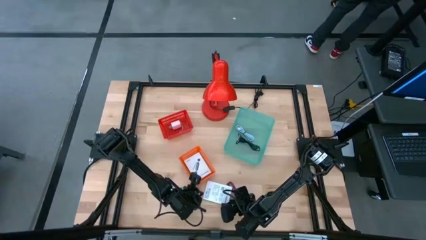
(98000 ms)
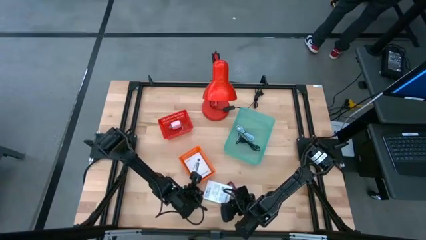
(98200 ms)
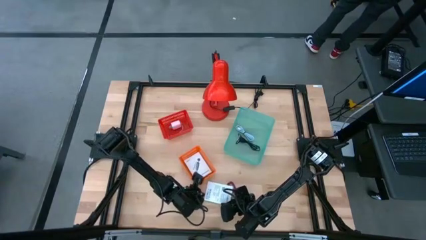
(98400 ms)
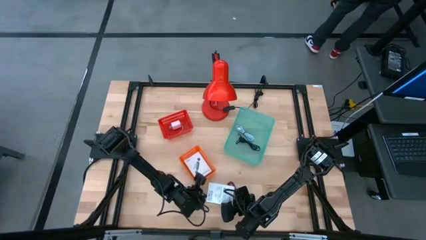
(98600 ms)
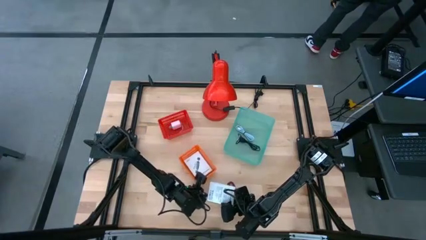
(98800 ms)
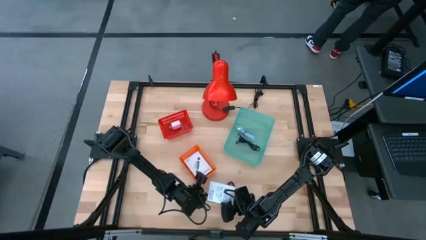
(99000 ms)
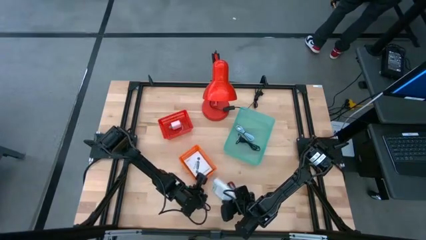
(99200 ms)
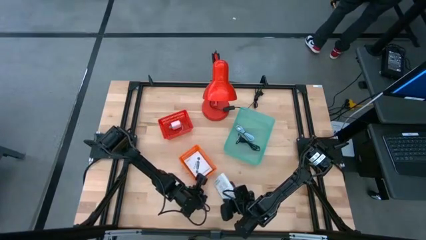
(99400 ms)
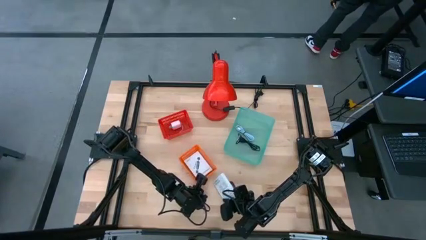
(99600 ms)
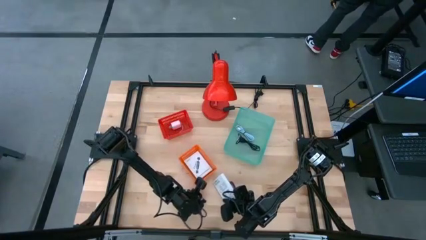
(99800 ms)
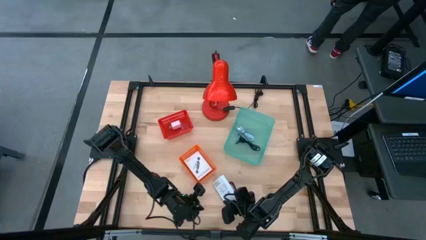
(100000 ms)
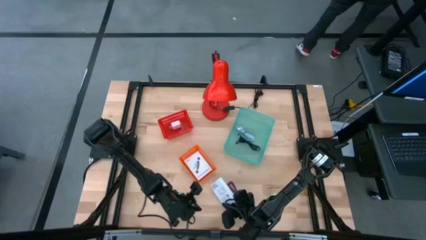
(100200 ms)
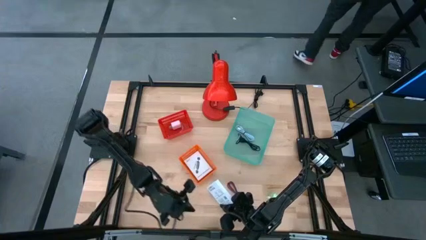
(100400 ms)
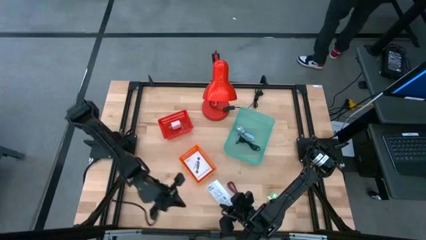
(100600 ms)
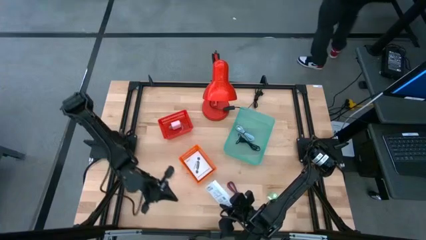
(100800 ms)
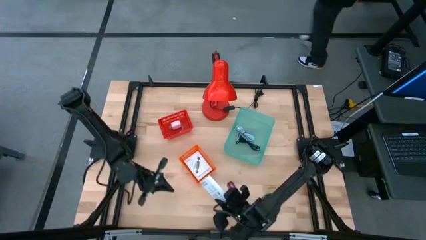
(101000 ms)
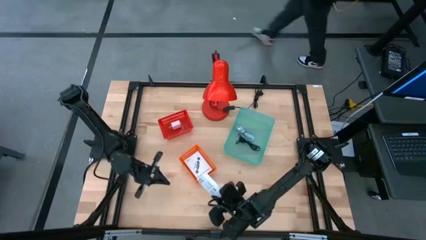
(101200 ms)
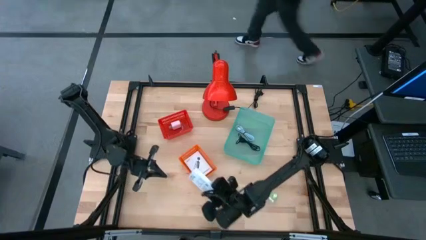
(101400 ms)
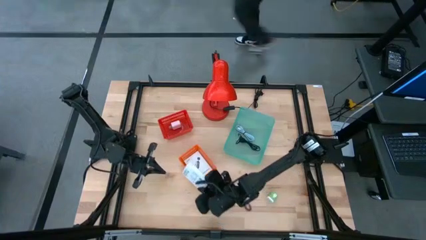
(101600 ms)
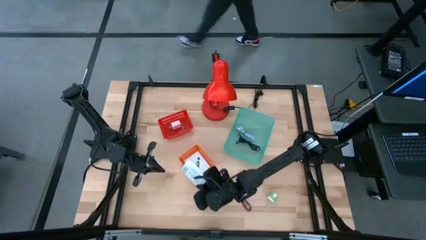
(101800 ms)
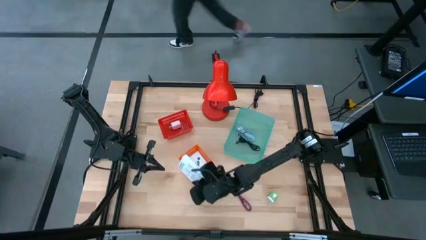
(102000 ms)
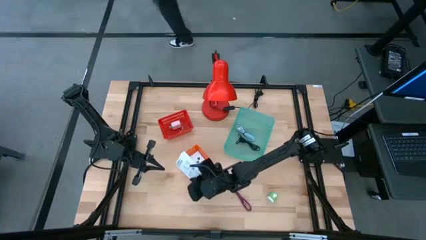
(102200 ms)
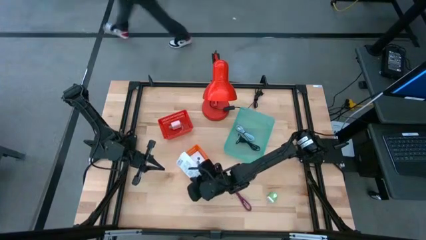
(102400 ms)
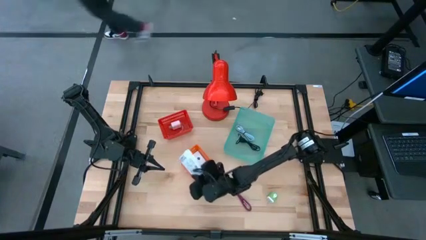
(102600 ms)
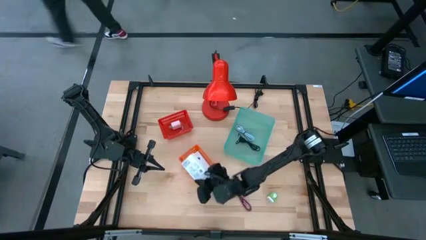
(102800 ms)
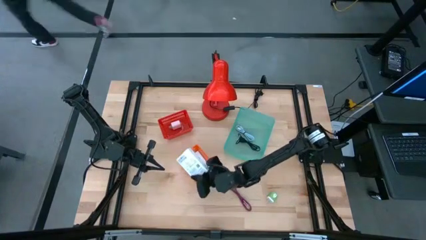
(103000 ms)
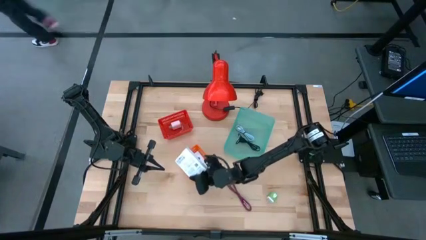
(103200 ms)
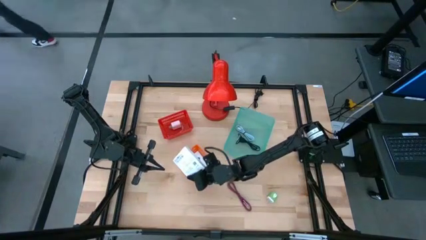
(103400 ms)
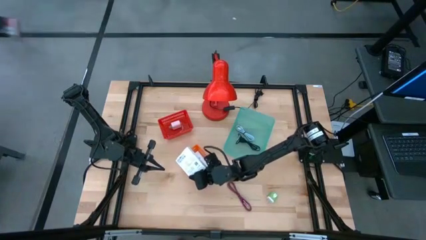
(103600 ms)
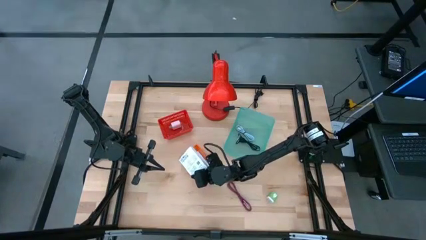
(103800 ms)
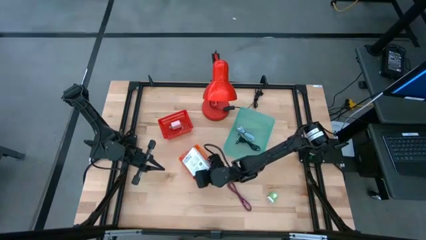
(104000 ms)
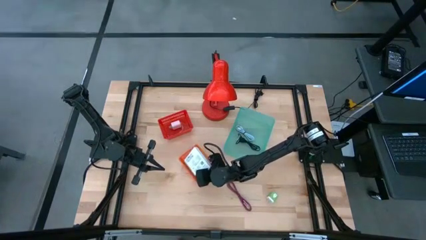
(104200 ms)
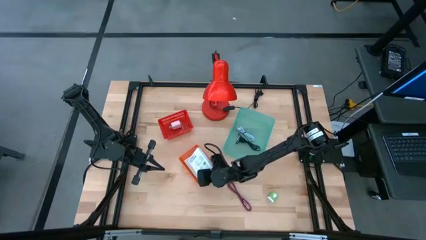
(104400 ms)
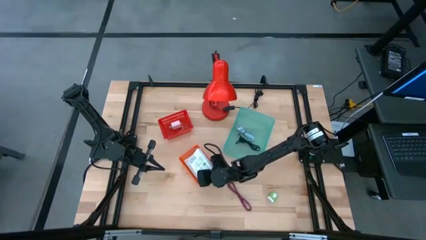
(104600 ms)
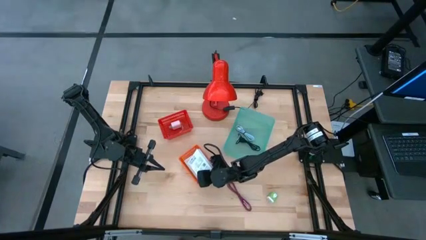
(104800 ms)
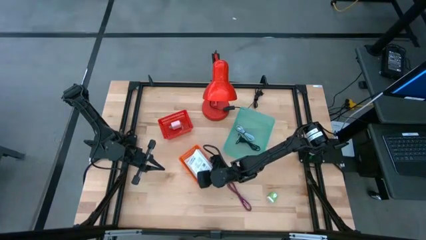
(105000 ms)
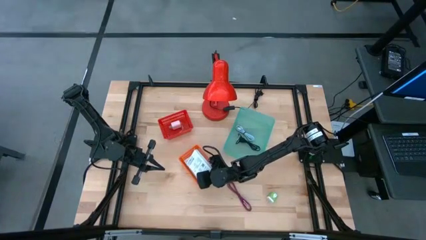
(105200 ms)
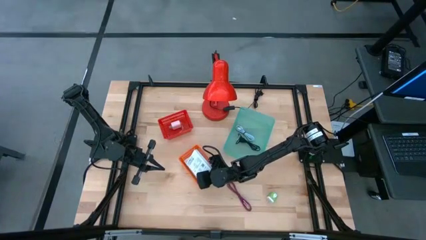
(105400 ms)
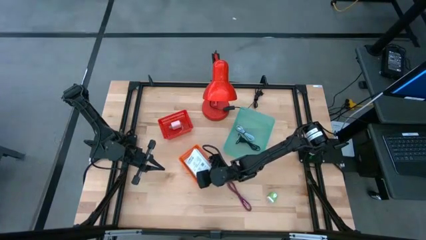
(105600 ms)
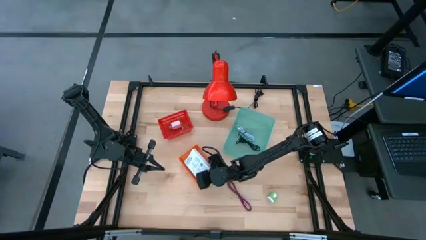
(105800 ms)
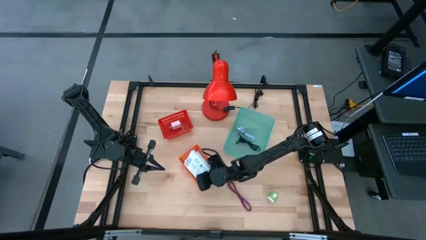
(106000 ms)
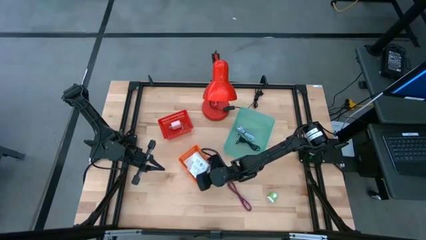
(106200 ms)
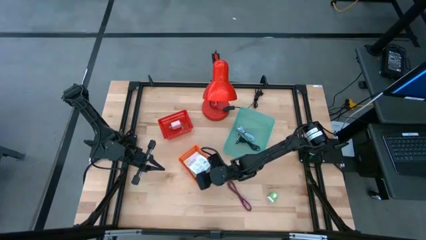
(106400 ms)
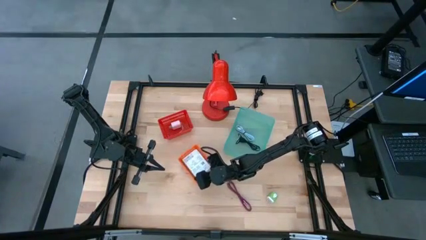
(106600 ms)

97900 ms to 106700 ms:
Task: Pick and place items into bin
Put the white card reader box into the orange bin

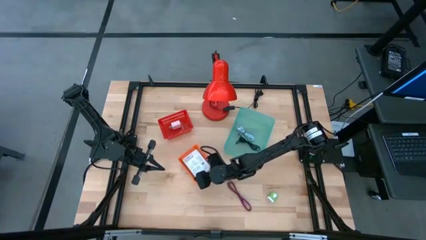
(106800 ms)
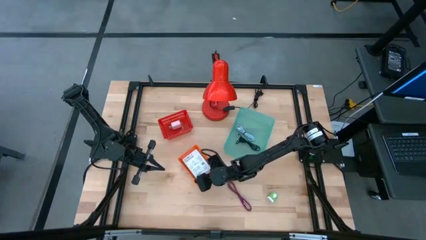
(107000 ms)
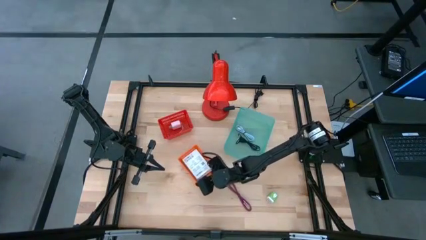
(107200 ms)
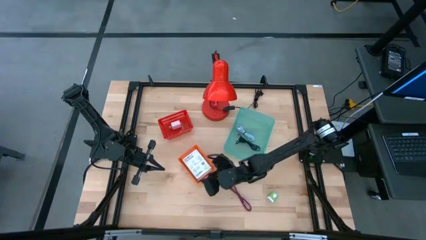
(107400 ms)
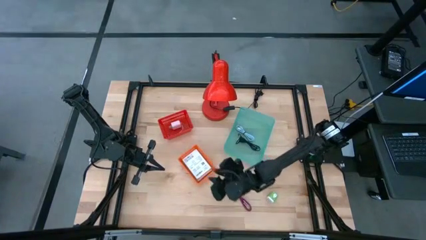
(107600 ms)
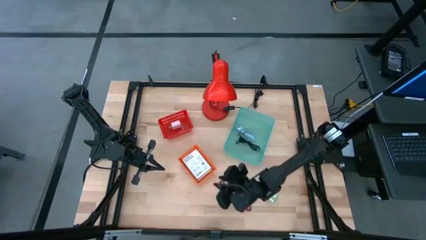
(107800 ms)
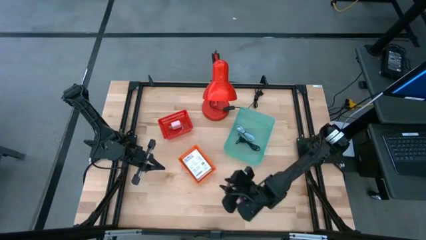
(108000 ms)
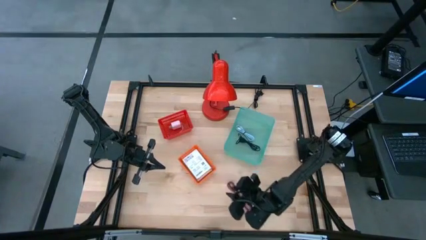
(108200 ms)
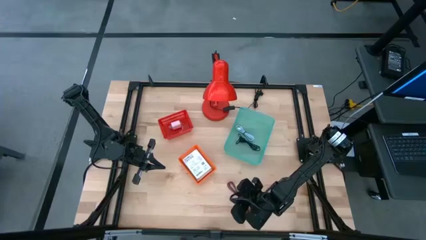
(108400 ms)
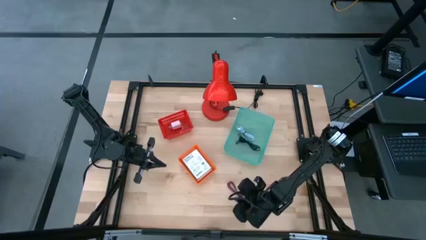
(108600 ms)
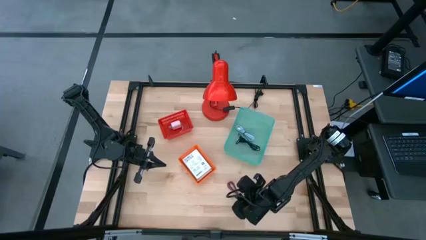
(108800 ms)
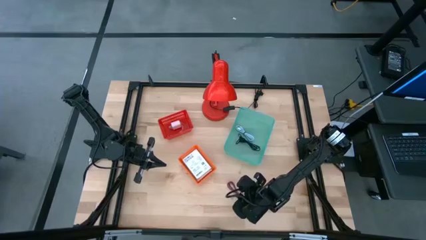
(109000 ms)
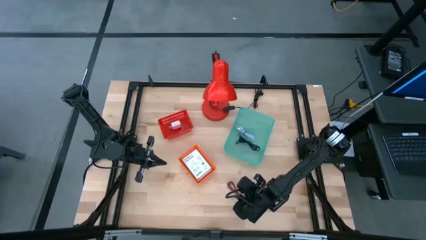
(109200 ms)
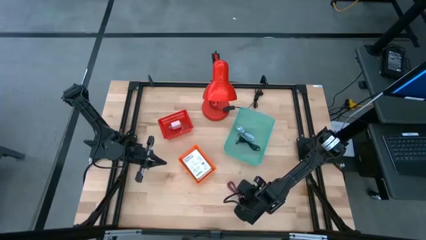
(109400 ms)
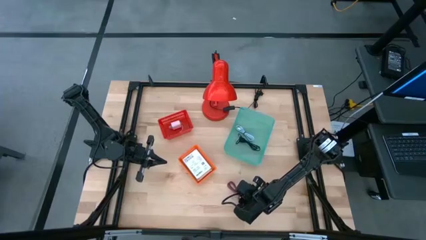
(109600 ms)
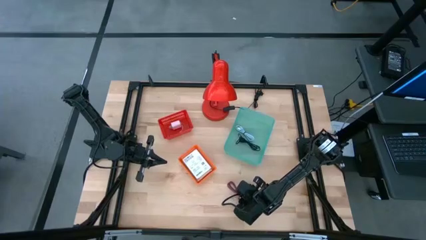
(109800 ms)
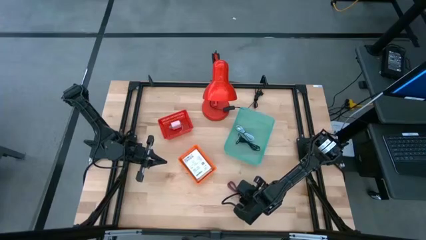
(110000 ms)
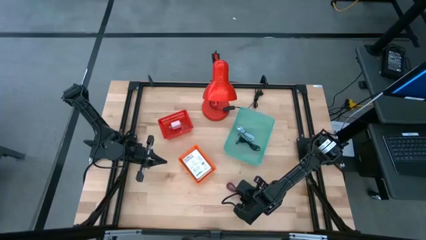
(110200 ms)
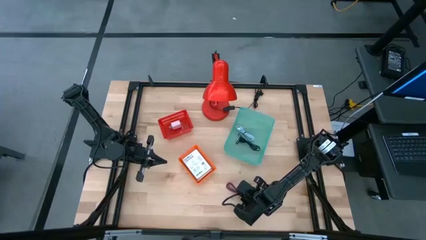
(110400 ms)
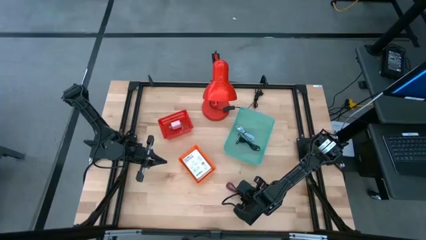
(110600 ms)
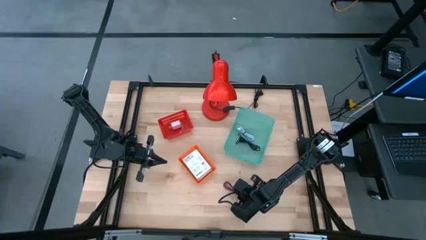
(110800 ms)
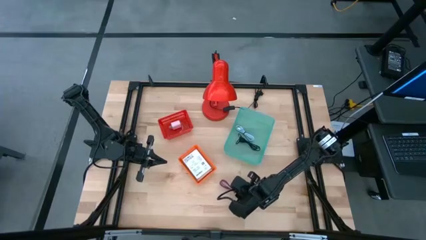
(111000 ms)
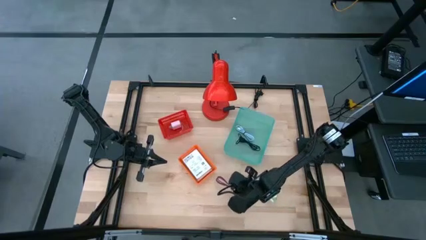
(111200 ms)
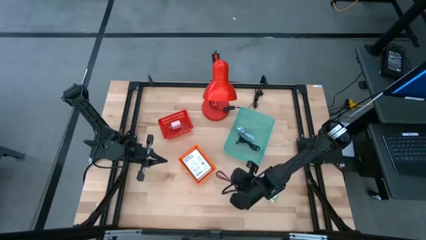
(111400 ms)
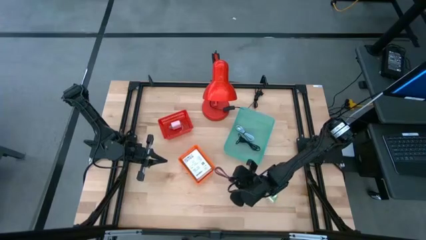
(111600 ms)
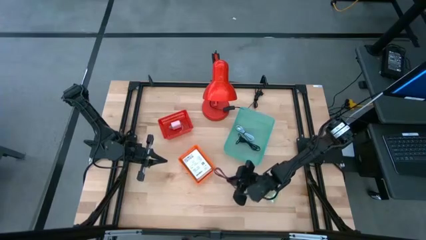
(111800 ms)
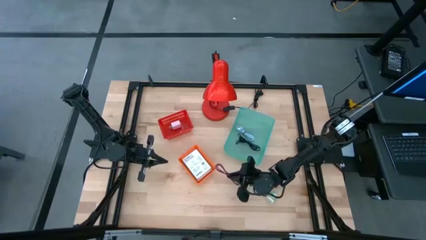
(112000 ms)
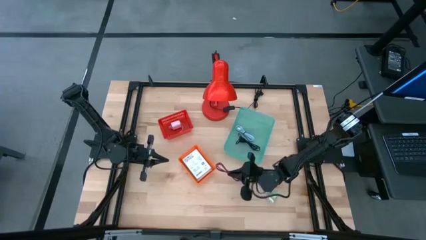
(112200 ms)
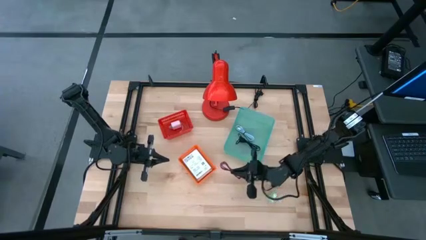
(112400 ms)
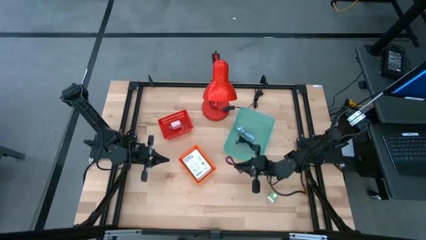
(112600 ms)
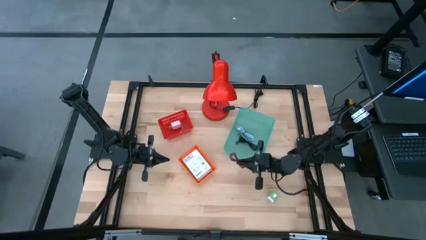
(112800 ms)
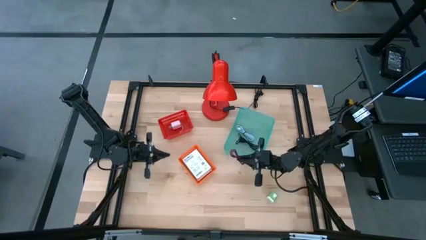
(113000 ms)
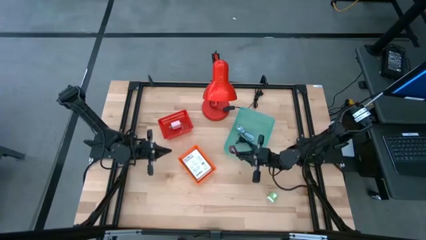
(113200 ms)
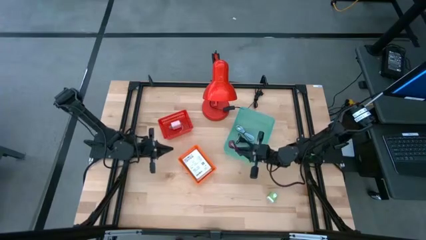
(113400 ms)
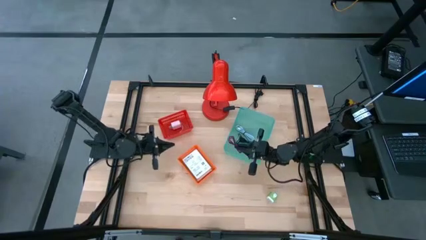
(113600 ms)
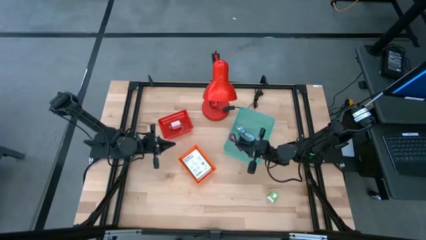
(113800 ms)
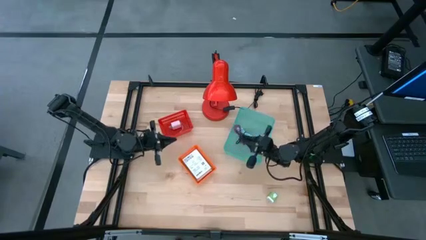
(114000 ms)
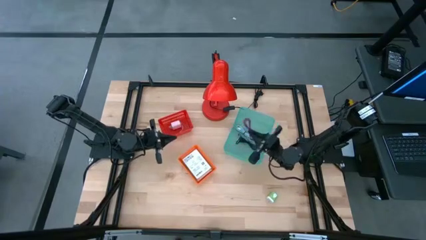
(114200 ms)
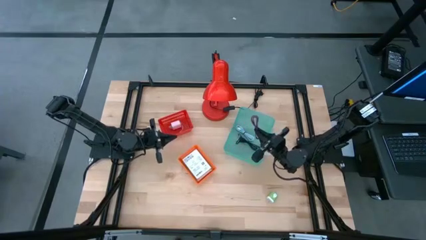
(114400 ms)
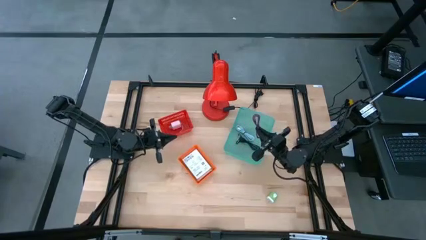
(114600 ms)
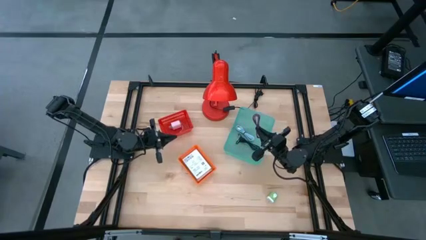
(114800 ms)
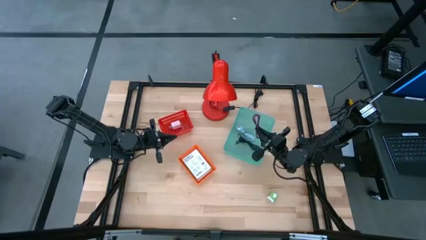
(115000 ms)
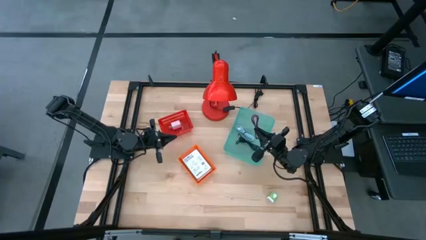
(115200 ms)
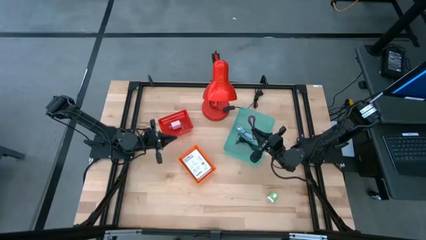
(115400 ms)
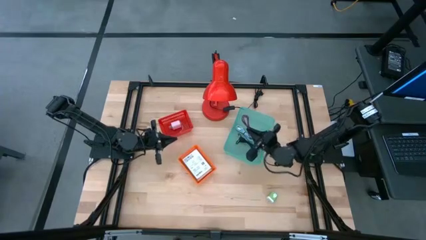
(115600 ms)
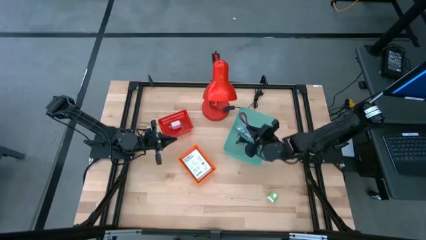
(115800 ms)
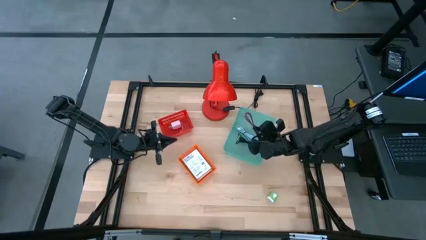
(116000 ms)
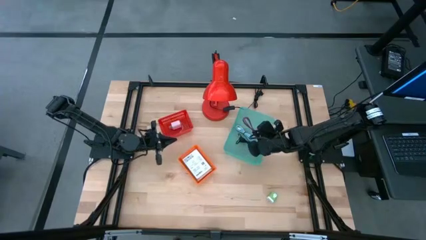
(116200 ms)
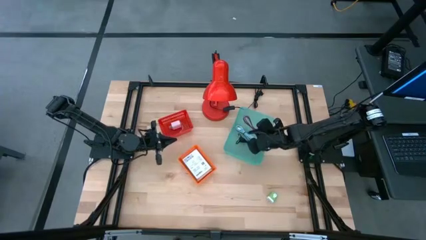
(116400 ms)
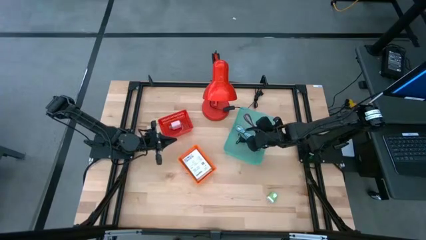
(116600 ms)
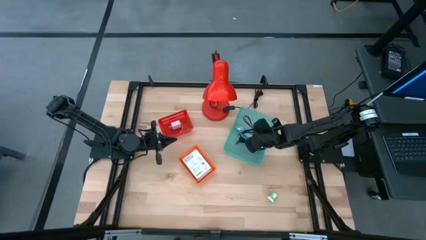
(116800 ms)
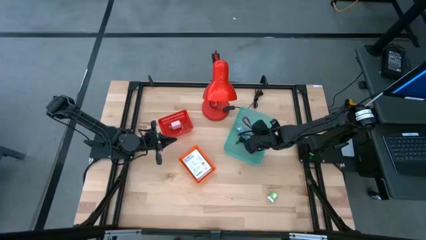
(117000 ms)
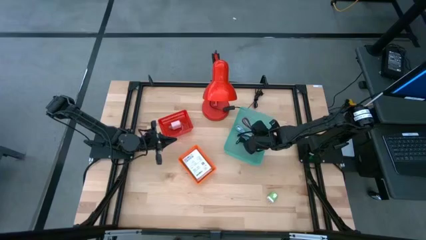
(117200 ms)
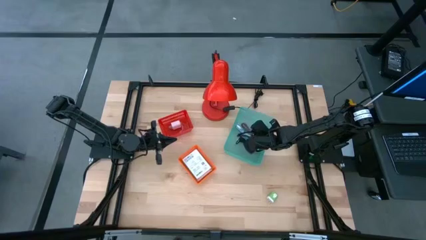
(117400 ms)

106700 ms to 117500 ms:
Put the pink charger cable into the blue bin
